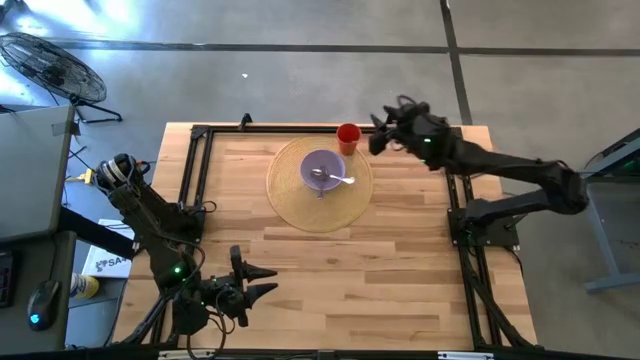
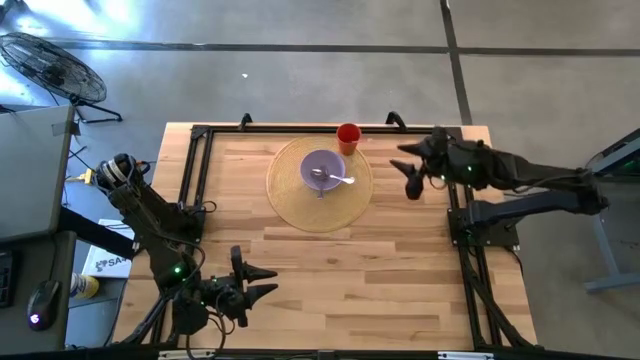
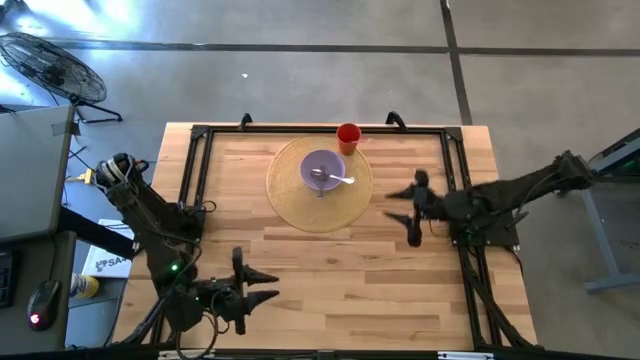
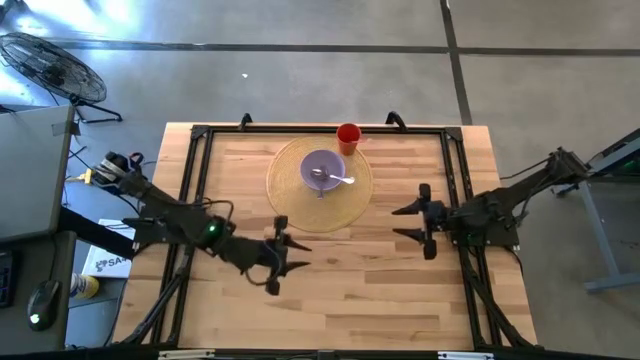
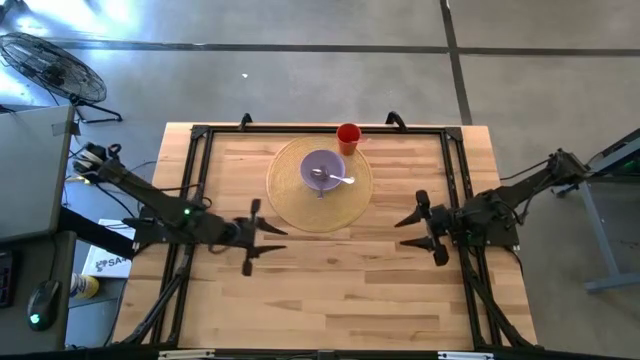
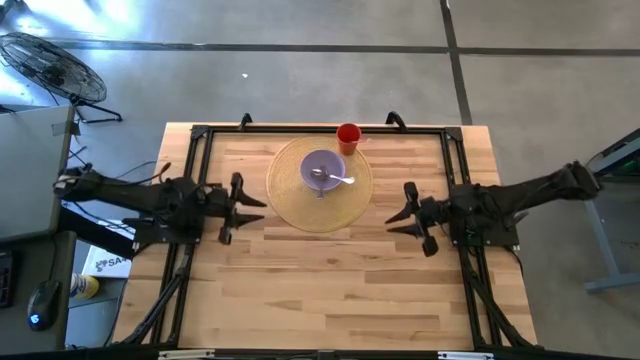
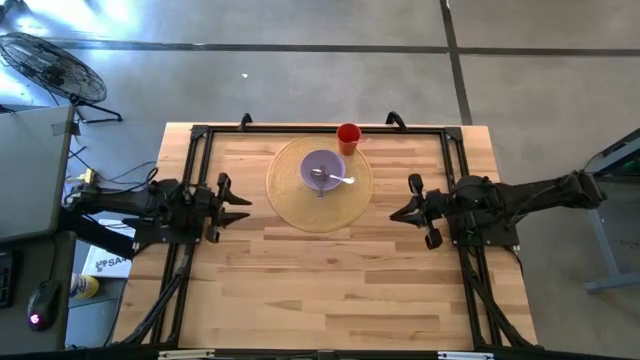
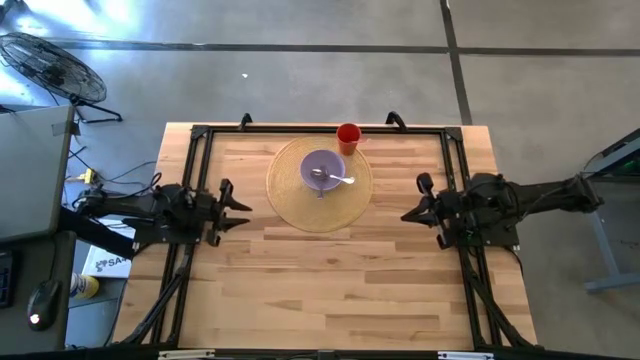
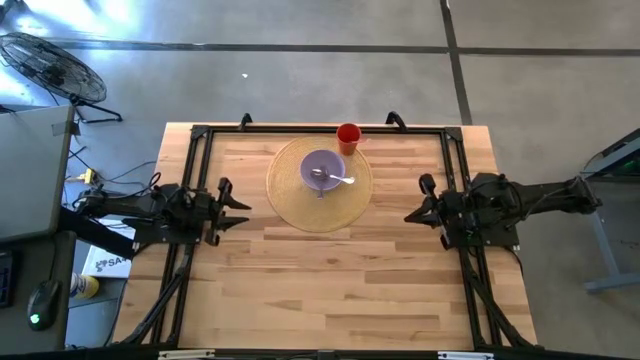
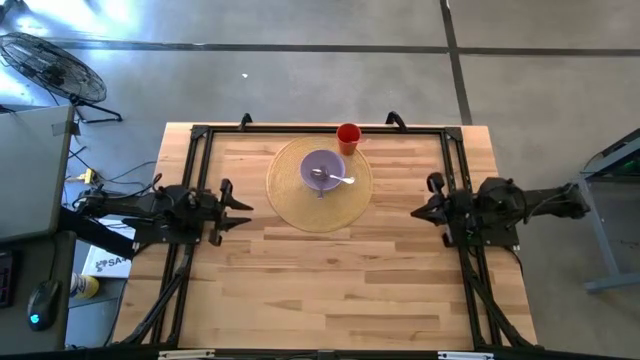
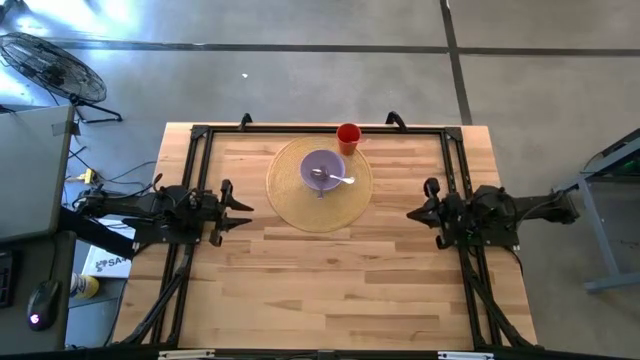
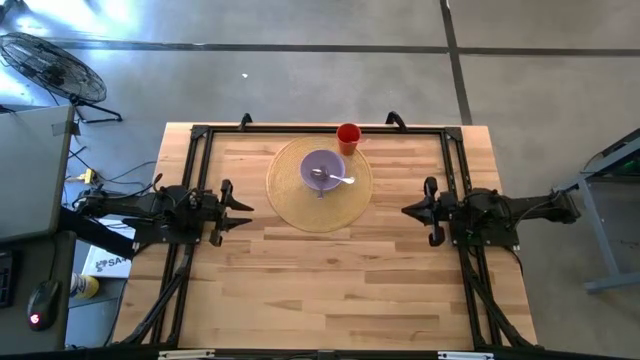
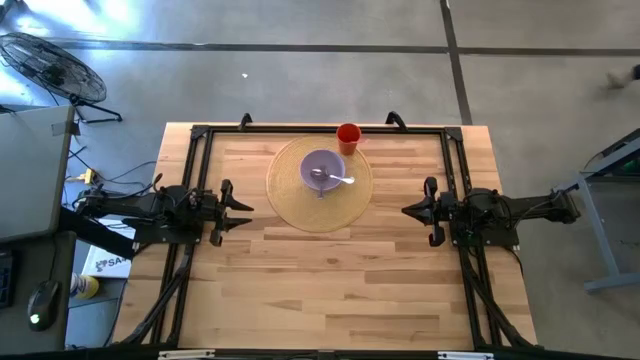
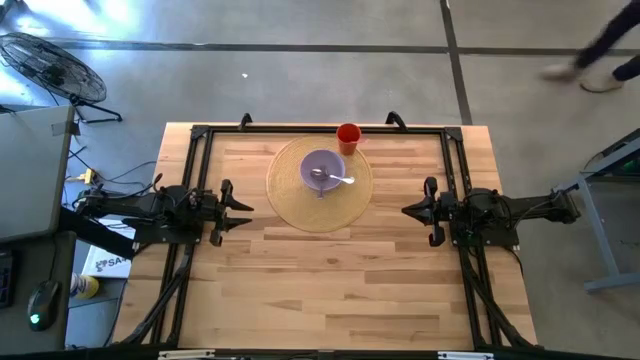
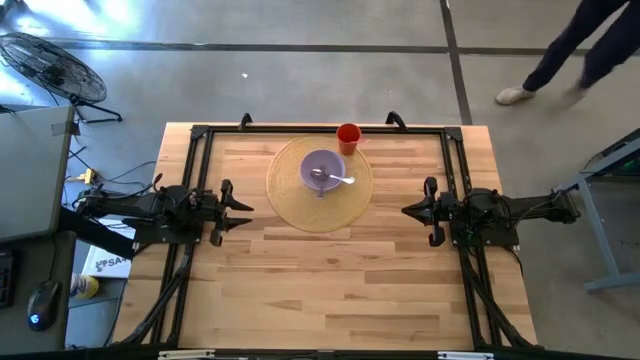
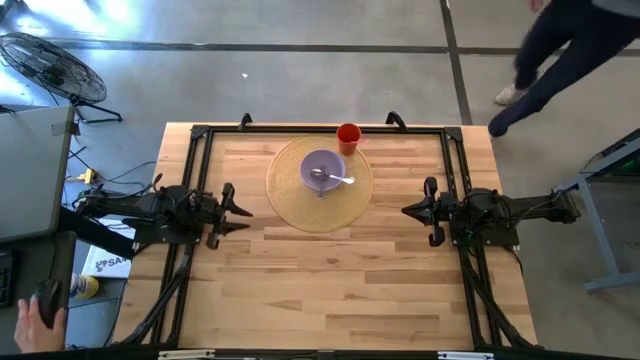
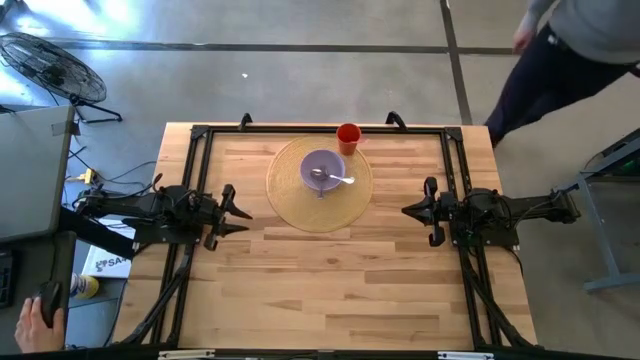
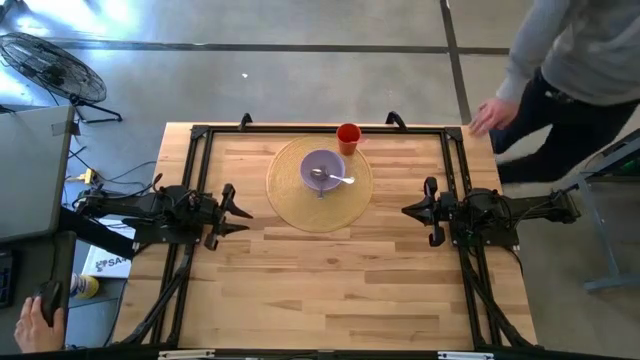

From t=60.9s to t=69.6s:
Task: Pick & Place Utensil
Return to Home Position

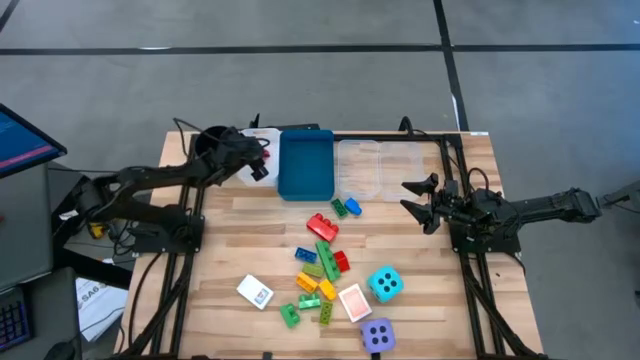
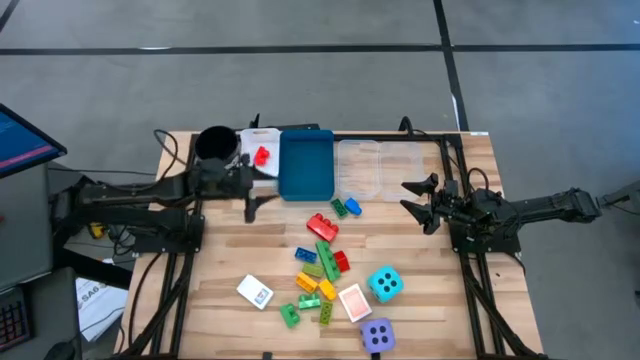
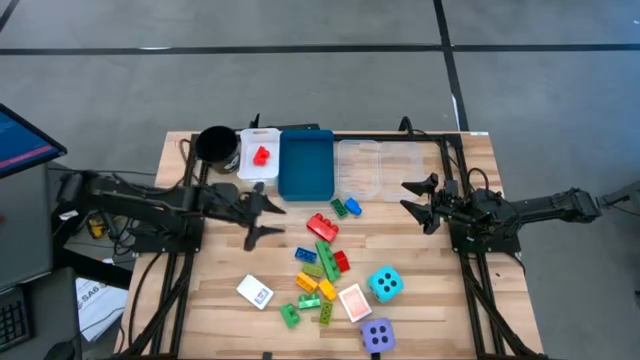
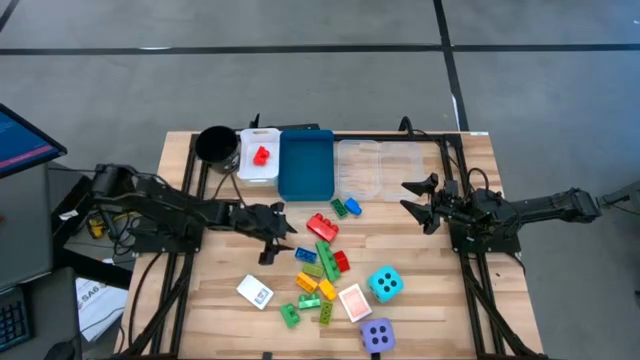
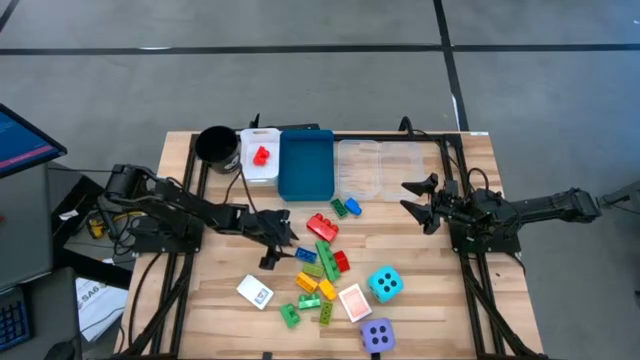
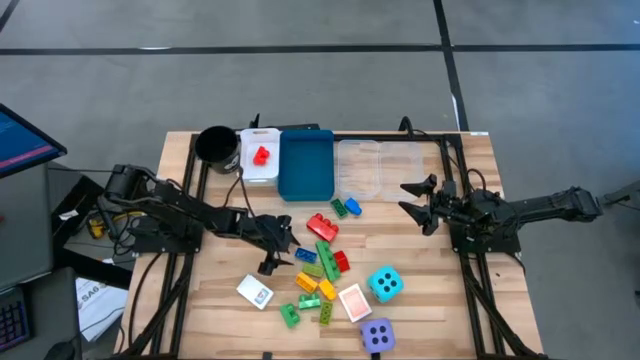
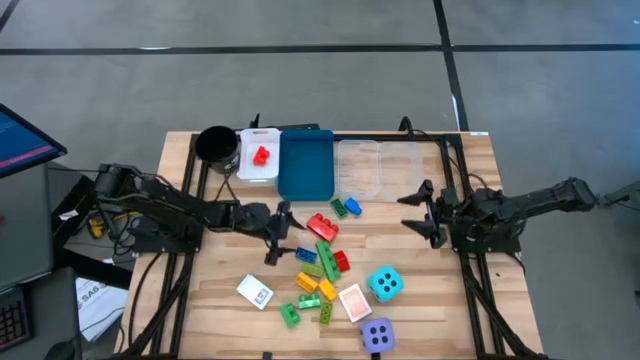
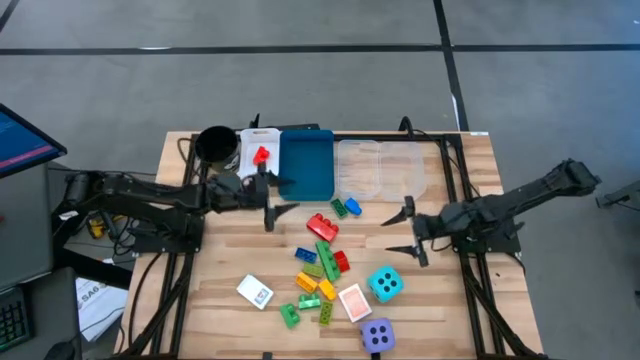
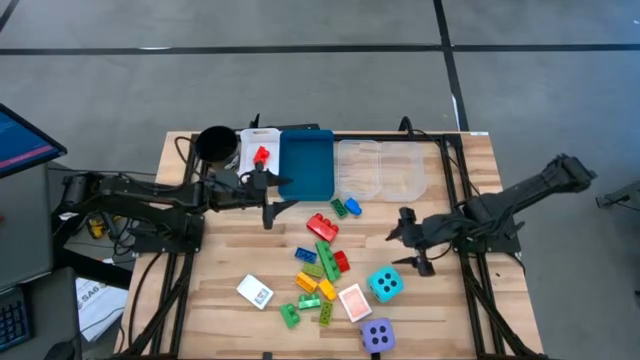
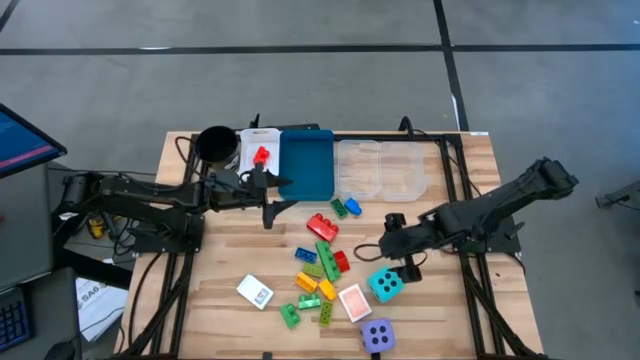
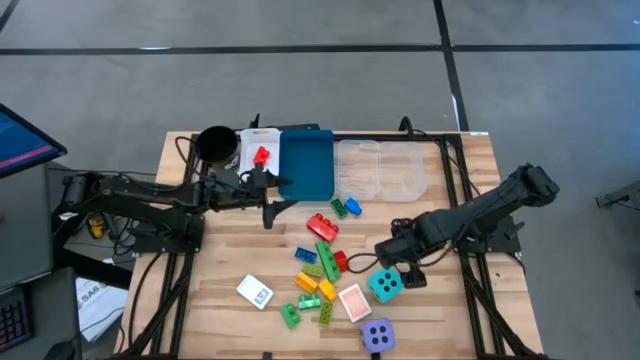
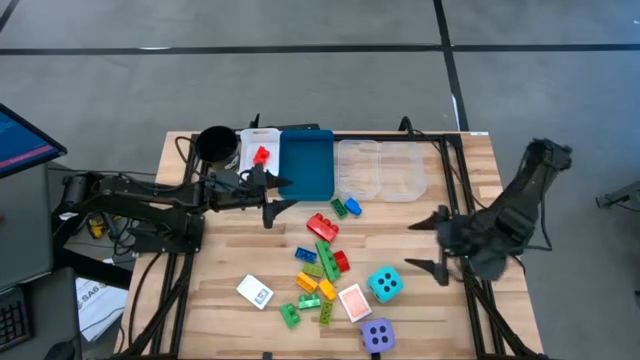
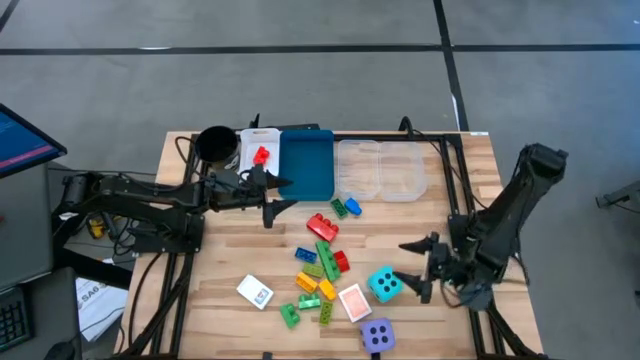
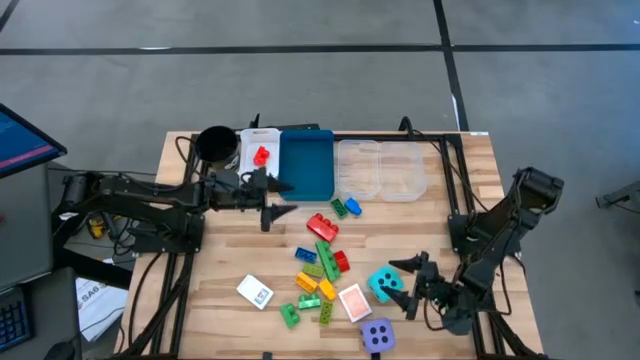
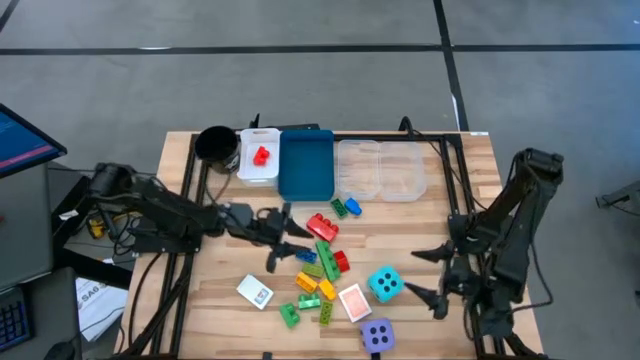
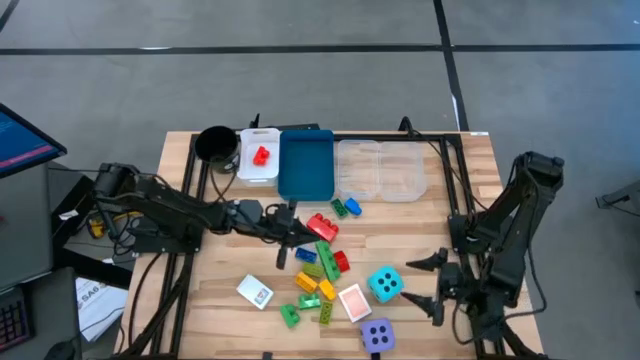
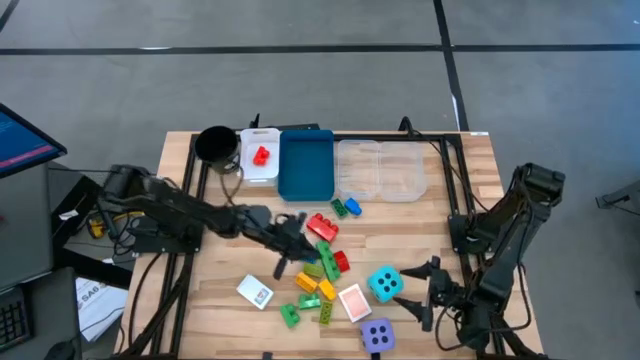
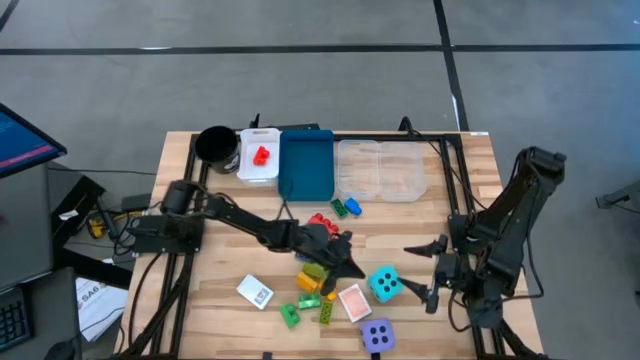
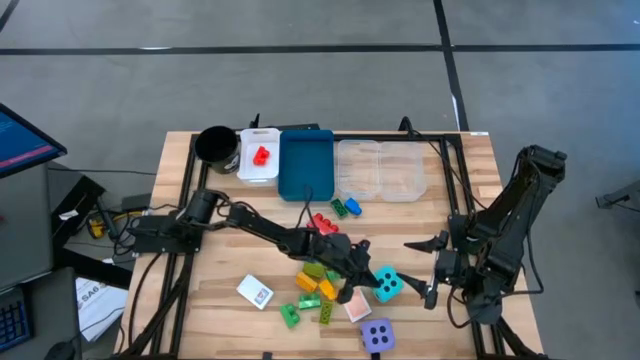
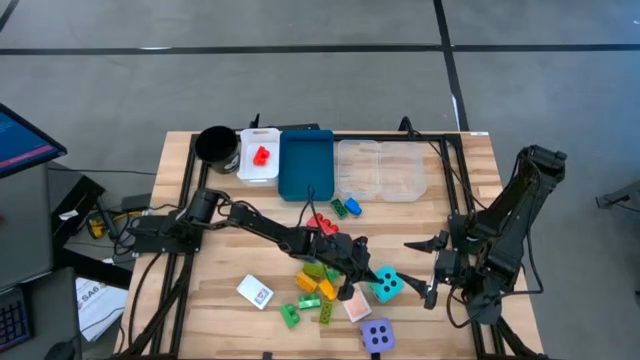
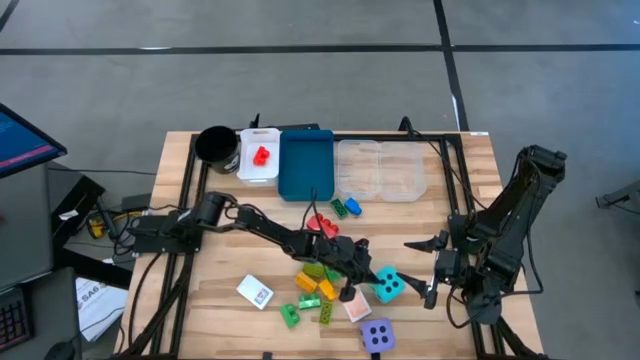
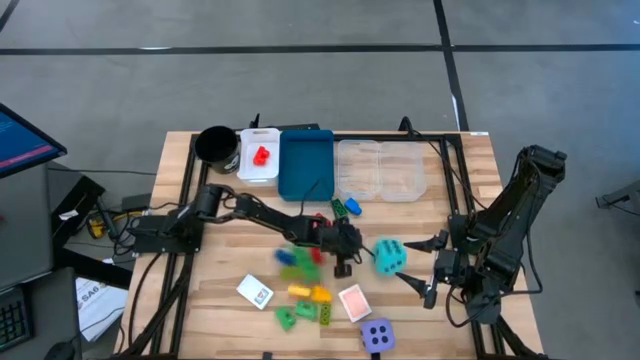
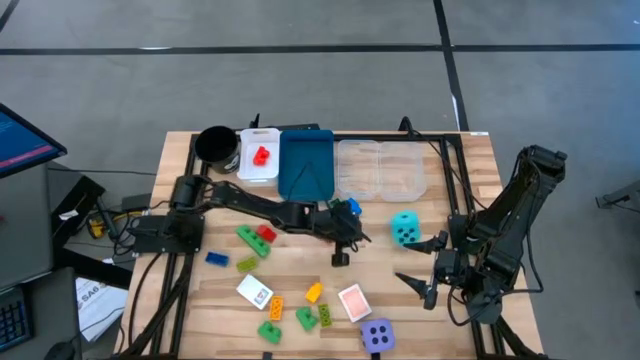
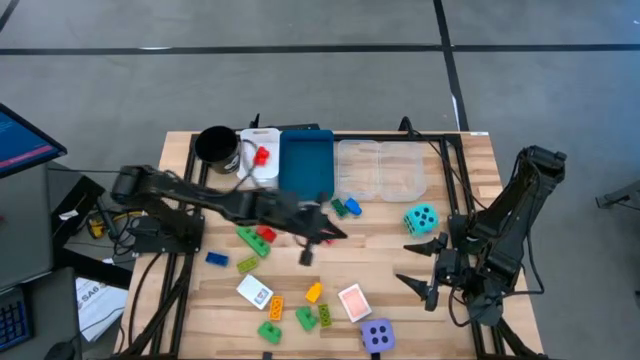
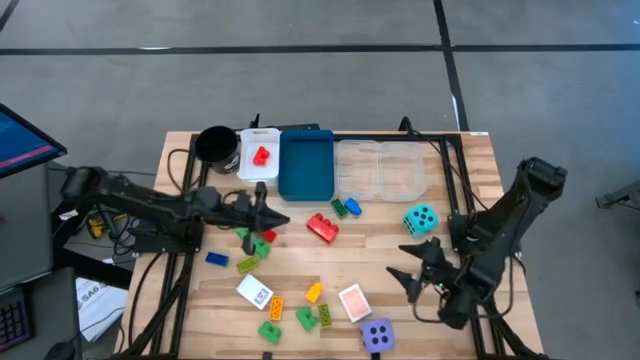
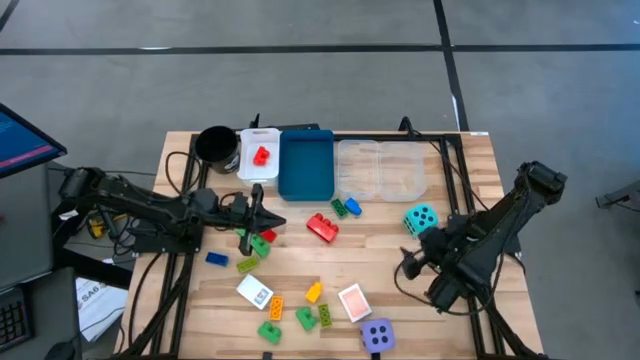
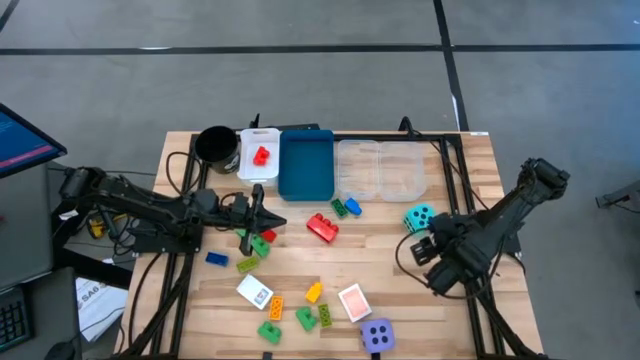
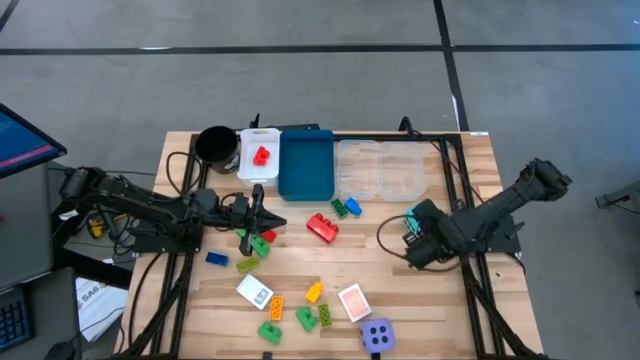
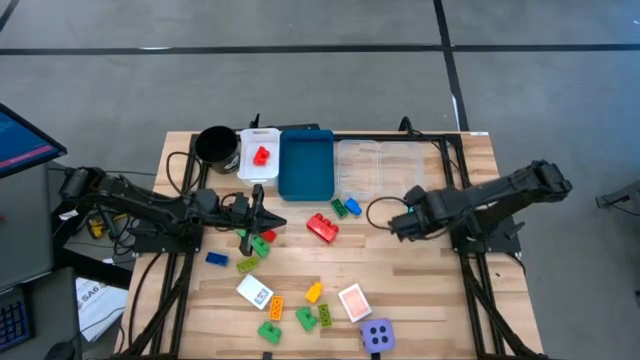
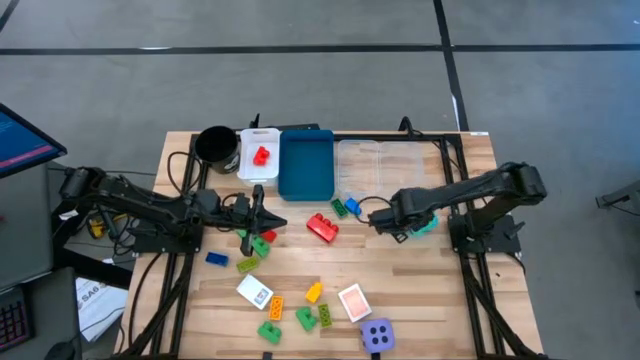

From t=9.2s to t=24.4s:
Task: Pick & Place Toys
Put the light blue dice into the blue bin
